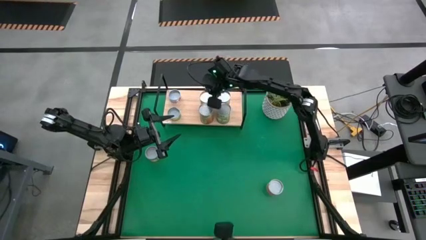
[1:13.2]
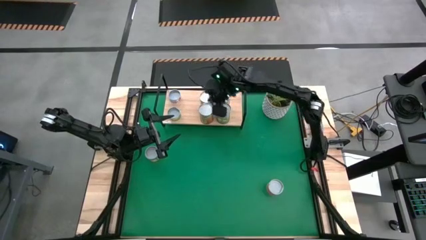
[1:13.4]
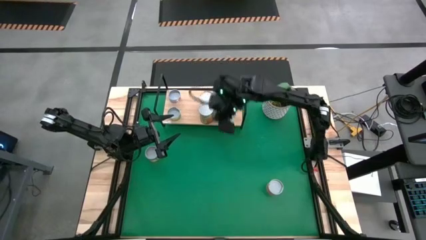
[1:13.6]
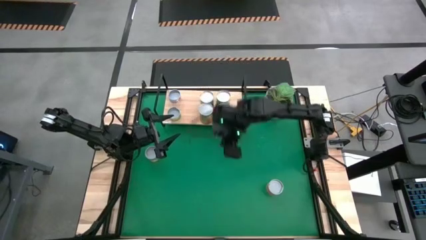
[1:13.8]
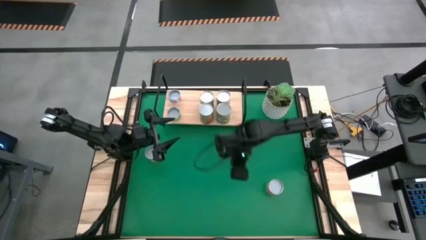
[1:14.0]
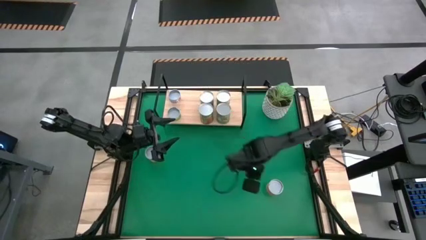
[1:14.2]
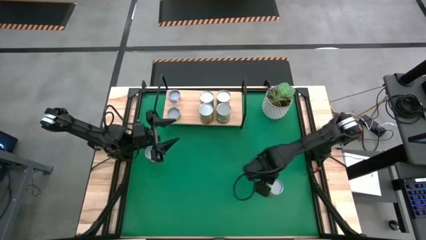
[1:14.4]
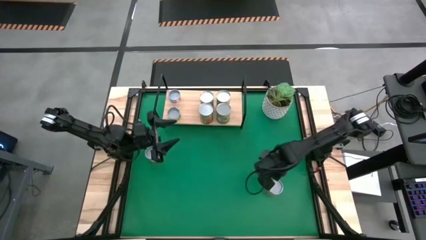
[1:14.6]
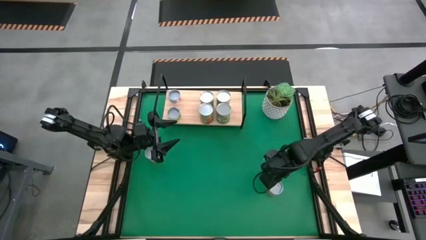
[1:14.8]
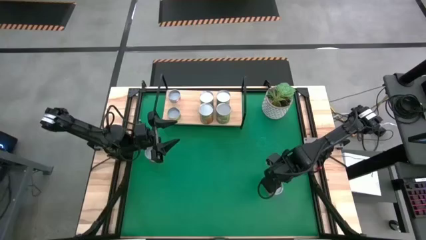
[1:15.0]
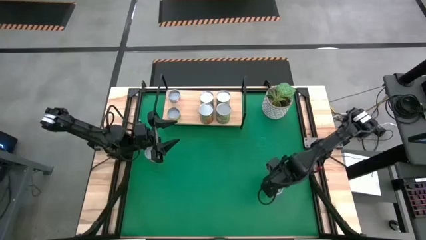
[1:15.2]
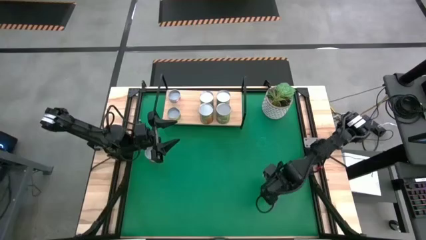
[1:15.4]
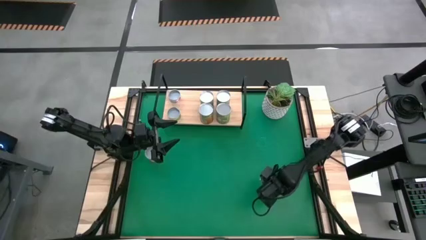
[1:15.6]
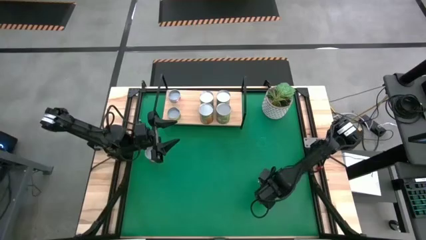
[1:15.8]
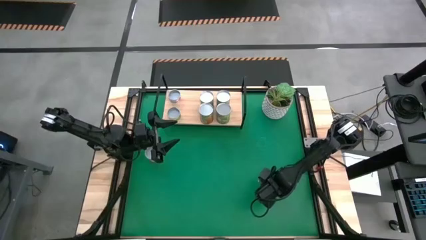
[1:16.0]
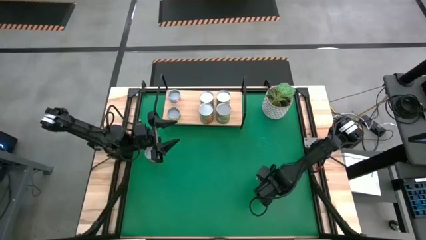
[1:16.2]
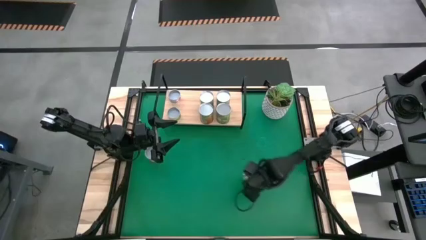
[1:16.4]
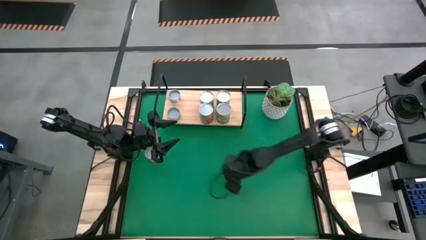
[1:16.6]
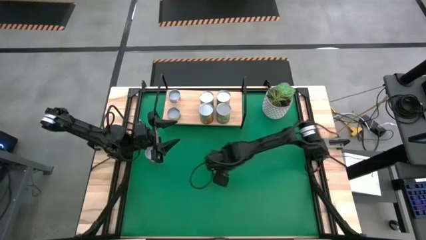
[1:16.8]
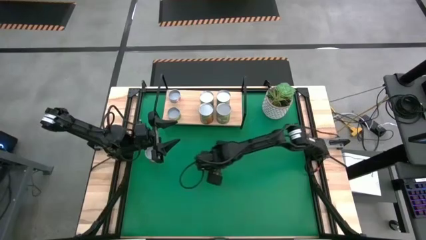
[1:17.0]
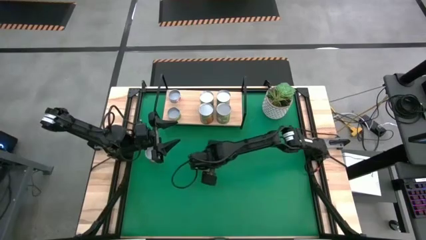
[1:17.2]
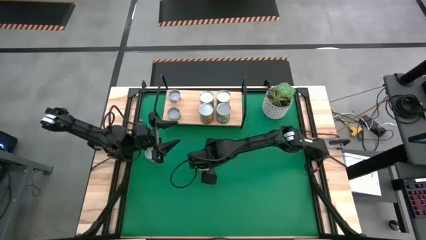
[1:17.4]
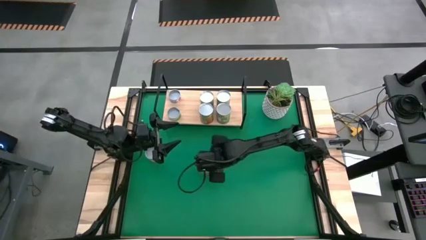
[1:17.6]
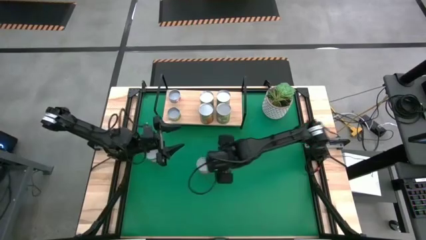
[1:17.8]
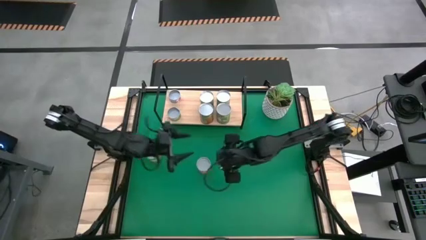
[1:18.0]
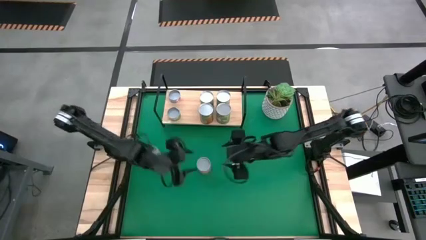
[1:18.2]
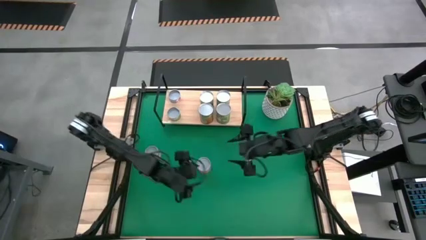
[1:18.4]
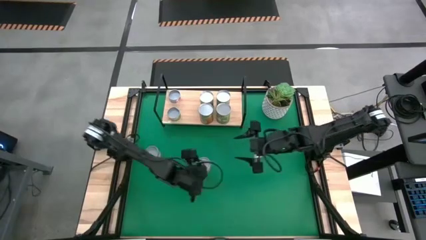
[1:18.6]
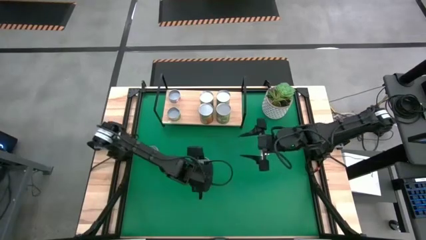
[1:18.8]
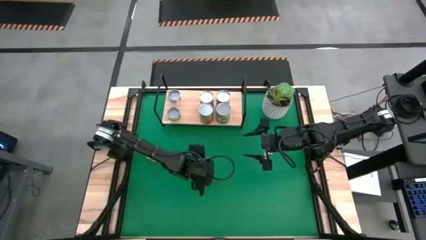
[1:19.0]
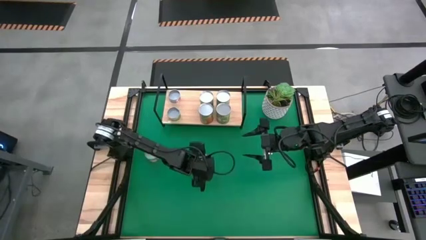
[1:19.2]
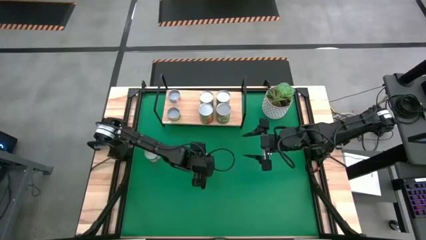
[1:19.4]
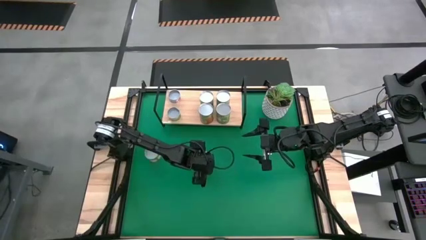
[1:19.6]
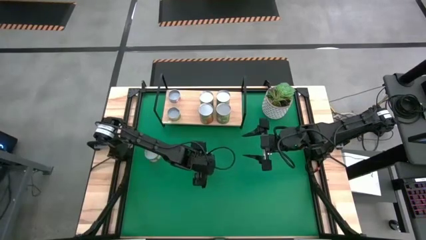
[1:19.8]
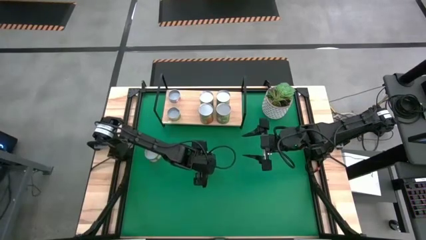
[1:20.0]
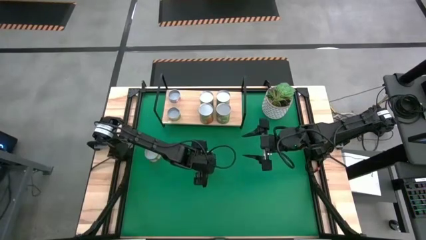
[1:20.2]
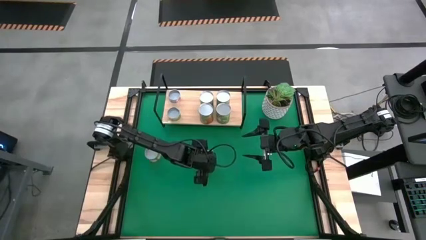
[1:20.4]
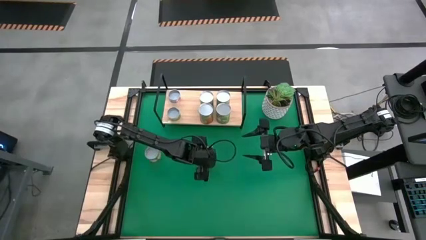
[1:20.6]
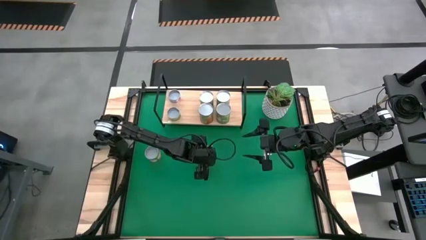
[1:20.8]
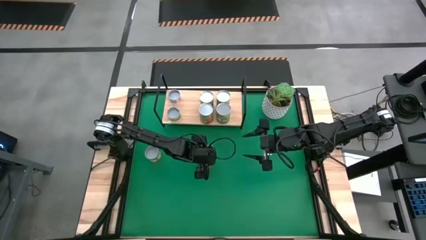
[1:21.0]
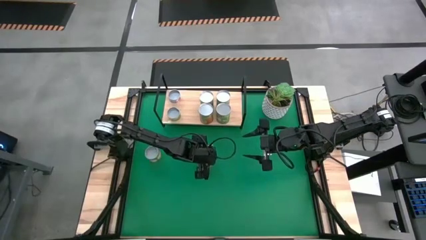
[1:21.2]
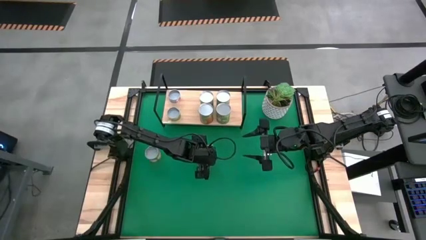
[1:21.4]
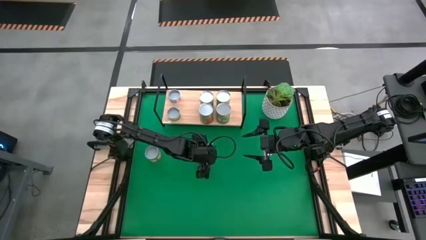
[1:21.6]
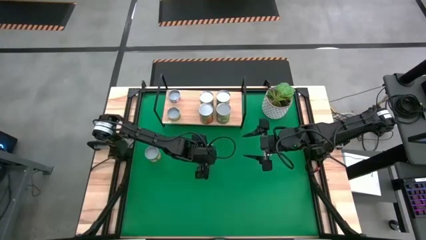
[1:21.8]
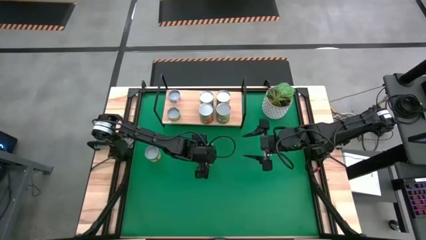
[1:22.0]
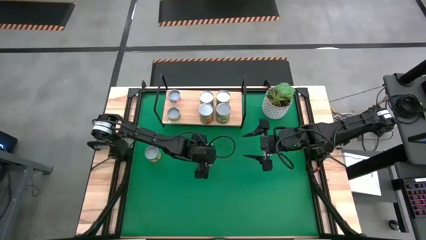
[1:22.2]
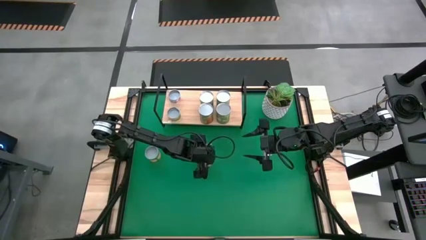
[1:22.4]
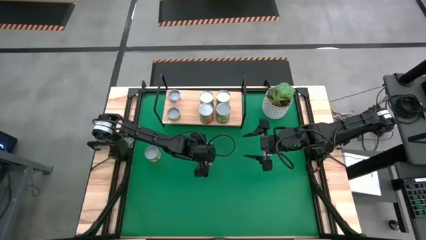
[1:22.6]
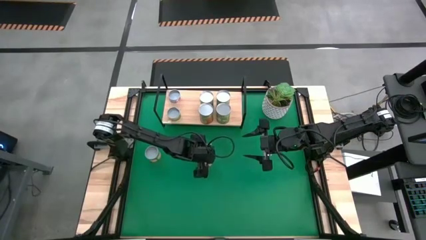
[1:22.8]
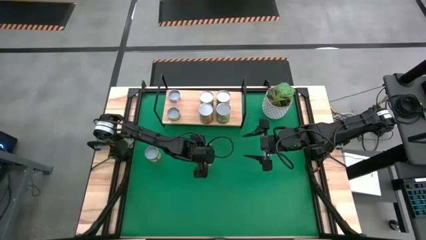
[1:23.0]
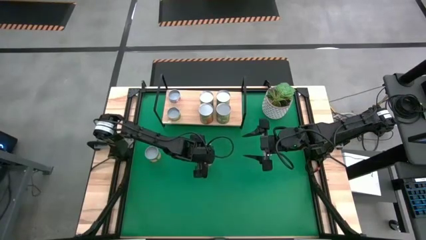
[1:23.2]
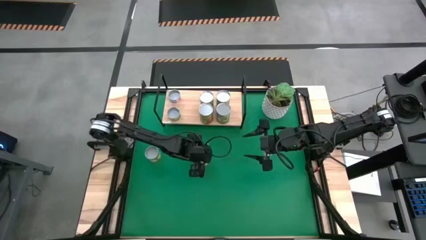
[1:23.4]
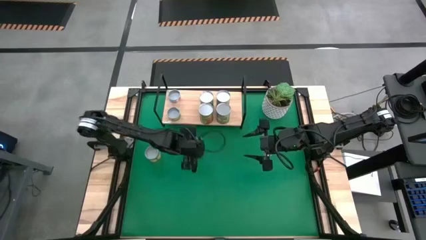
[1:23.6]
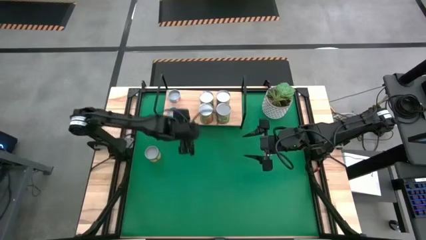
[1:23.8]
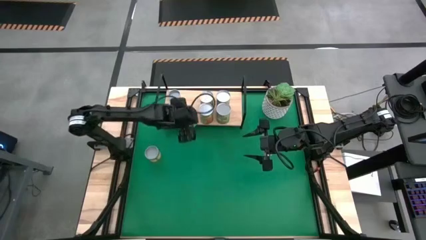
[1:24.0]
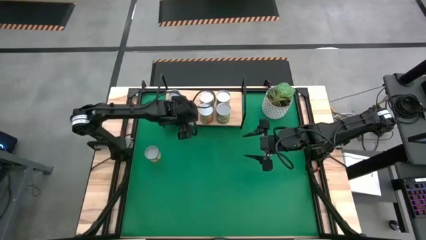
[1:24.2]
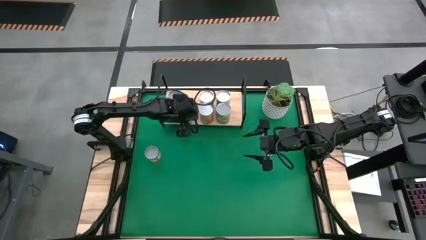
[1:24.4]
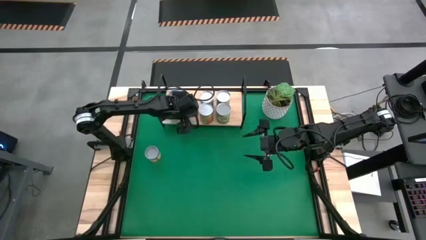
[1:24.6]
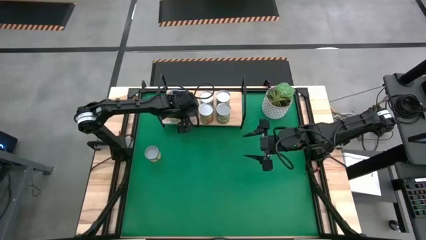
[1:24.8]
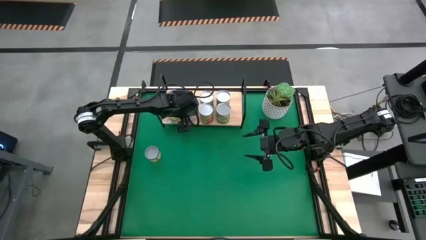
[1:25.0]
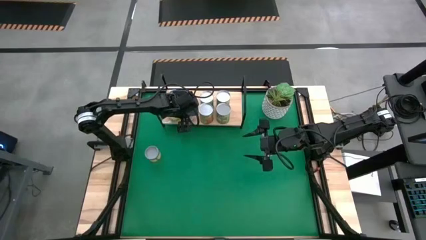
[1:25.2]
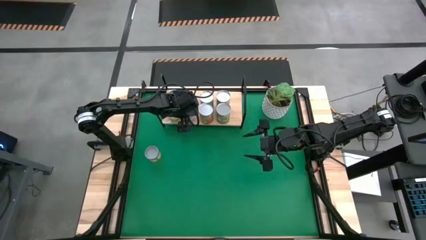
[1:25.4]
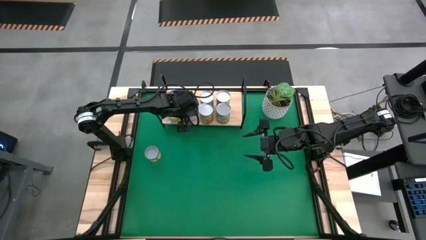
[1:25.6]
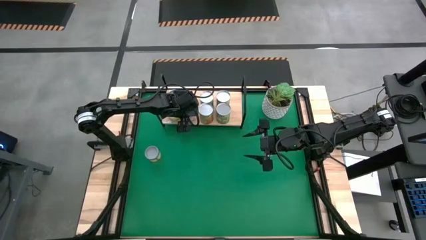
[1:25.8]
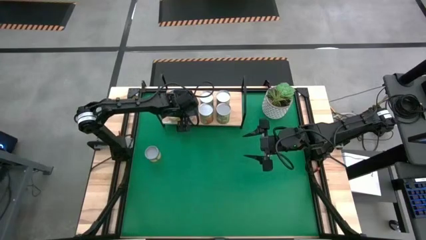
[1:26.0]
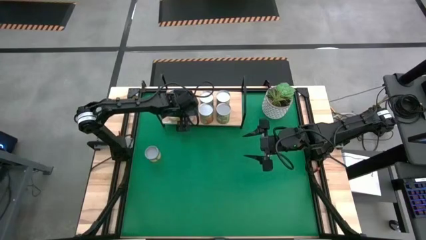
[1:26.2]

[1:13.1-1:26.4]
Task: Pick and place cans onto a shelf
Put the canned tomato sauce on the shelf
